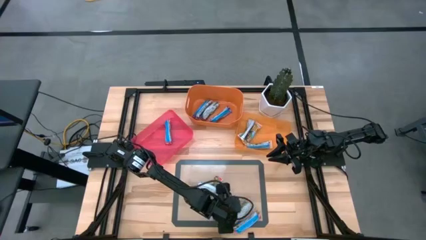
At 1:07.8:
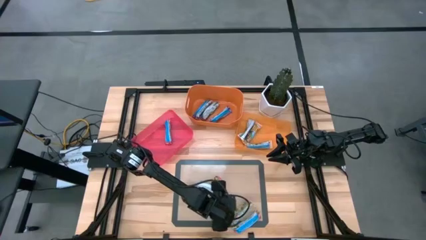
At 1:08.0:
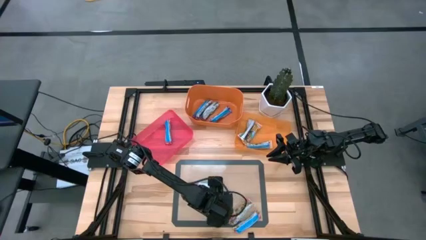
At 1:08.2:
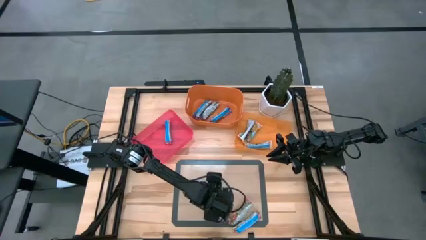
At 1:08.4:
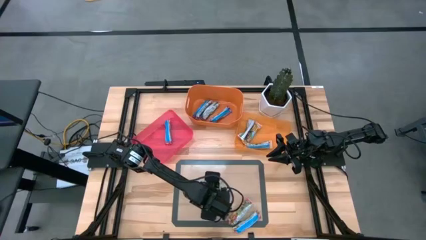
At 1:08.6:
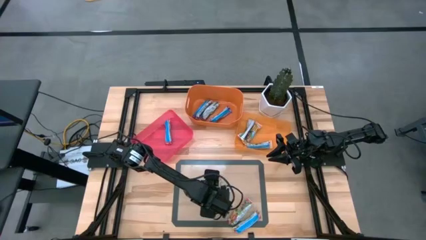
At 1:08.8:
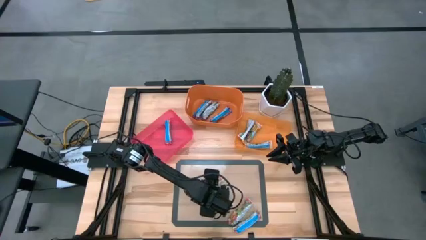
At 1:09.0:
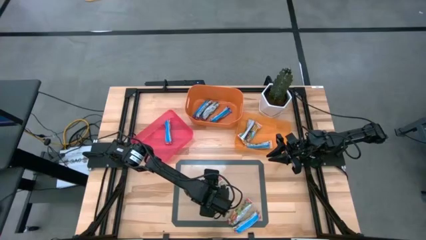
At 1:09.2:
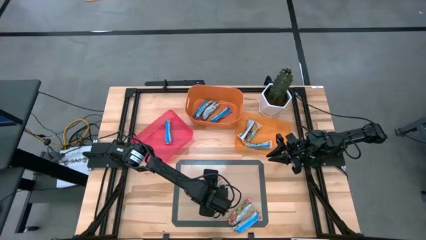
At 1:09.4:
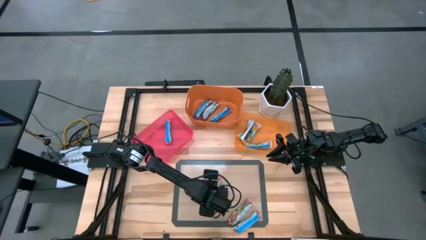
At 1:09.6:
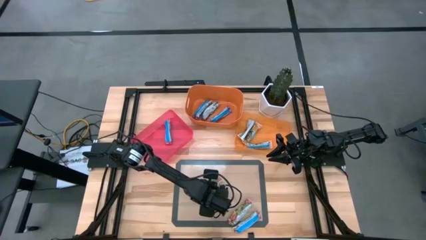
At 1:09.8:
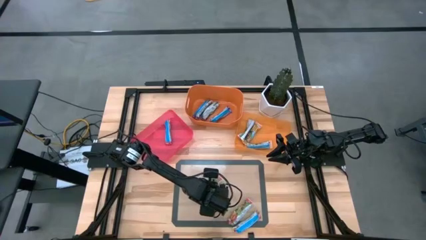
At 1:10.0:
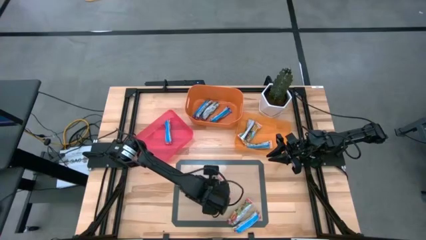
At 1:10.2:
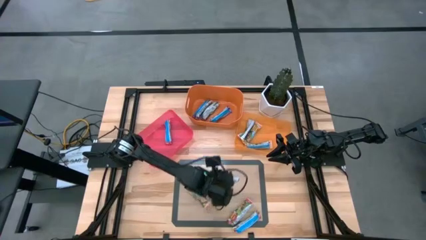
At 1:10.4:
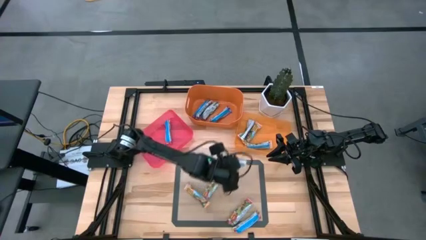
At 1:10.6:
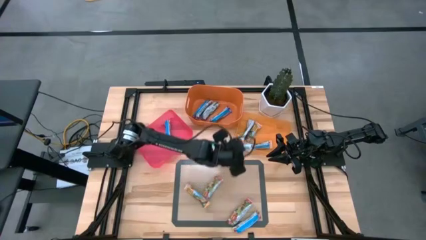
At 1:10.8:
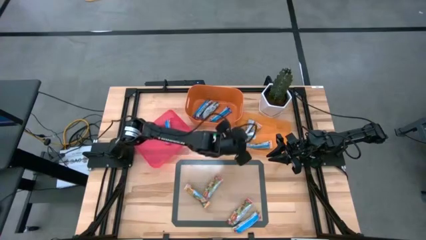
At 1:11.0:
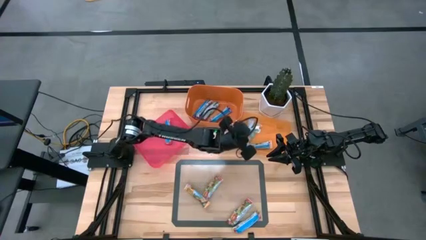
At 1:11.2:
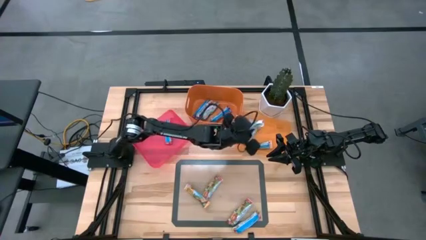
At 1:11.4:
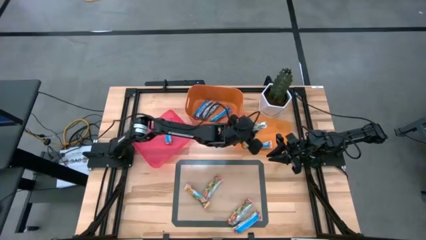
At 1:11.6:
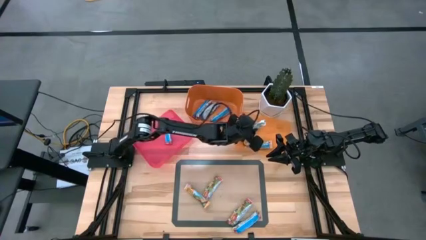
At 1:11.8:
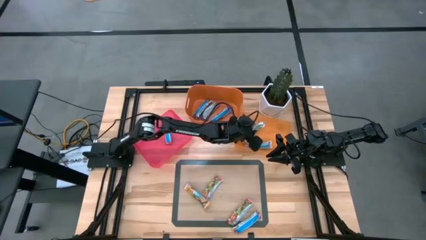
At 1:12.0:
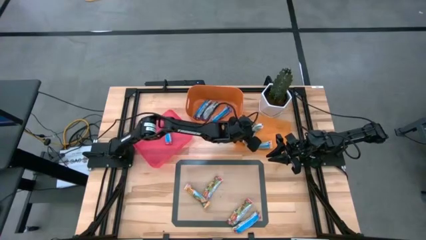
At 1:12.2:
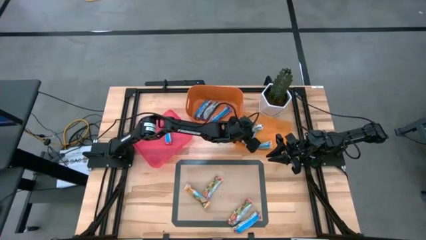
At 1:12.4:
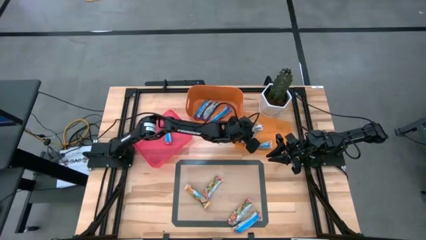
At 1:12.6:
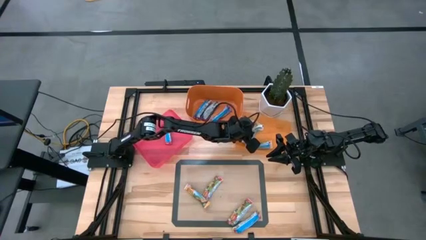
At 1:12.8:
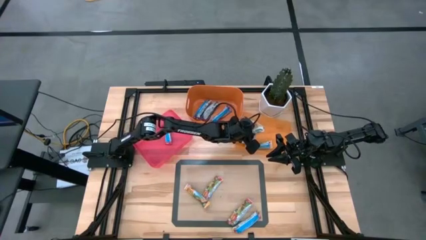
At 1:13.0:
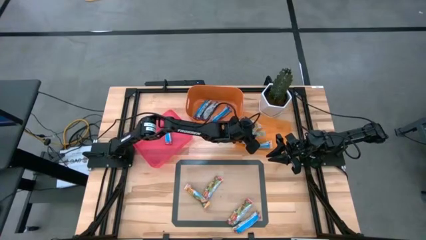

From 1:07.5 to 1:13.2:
Task: Pick and place Granola Bars by type
Put the right yellow granola bar into the light orange bin

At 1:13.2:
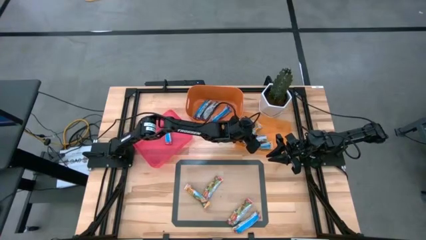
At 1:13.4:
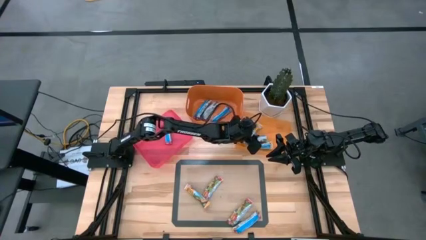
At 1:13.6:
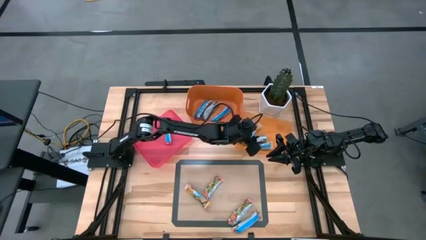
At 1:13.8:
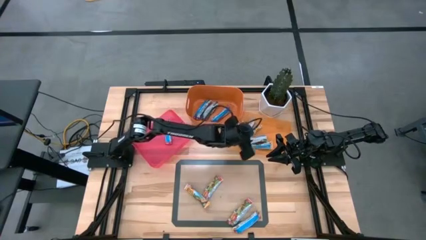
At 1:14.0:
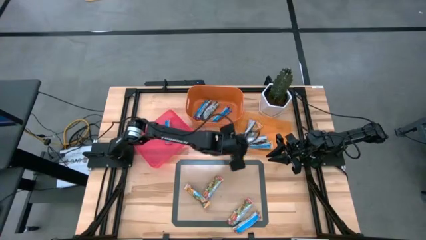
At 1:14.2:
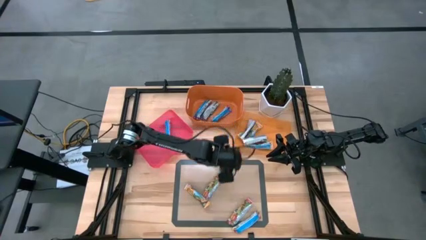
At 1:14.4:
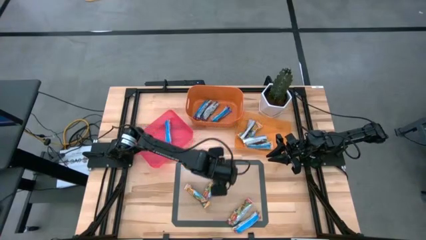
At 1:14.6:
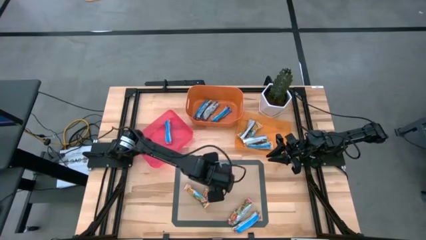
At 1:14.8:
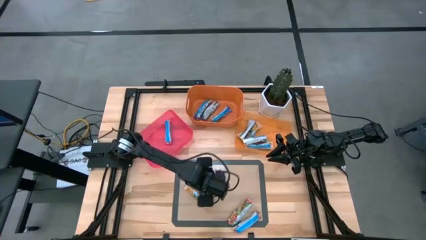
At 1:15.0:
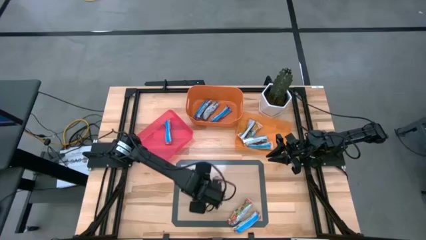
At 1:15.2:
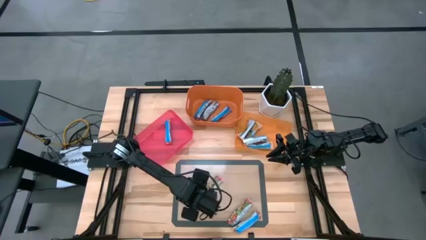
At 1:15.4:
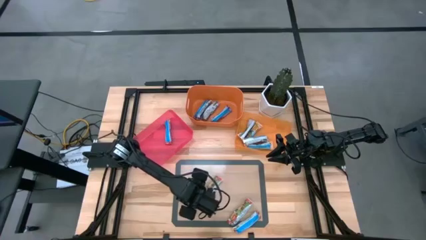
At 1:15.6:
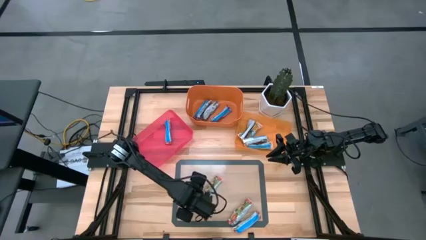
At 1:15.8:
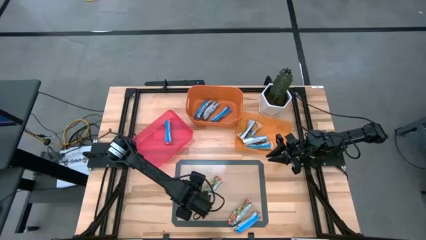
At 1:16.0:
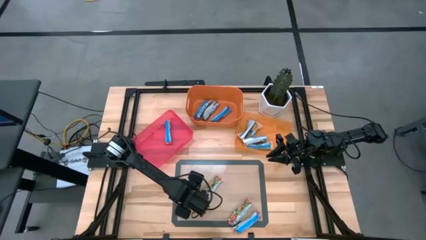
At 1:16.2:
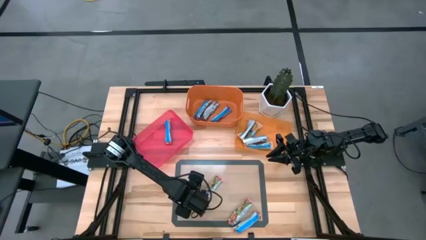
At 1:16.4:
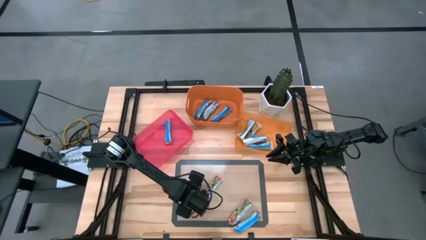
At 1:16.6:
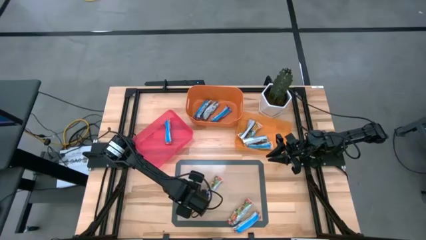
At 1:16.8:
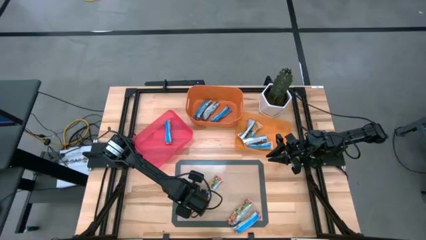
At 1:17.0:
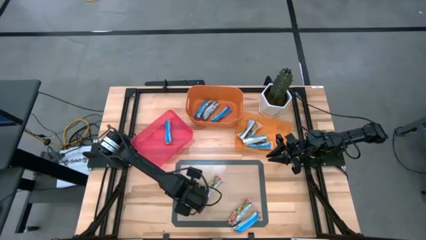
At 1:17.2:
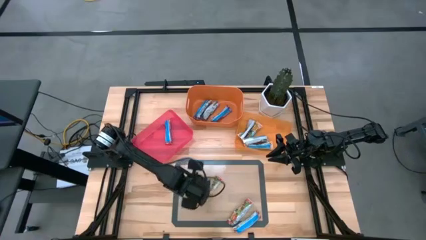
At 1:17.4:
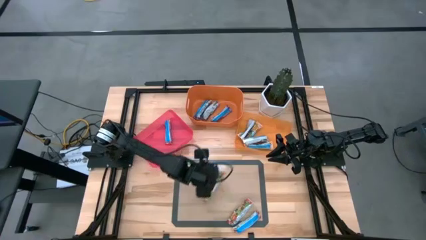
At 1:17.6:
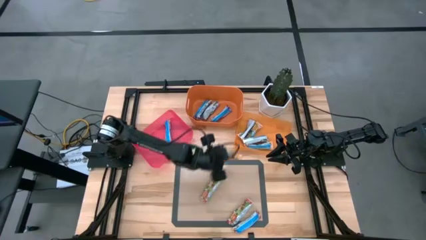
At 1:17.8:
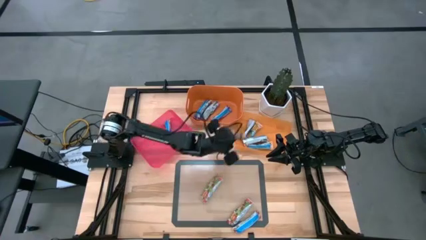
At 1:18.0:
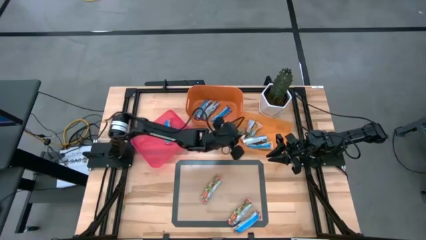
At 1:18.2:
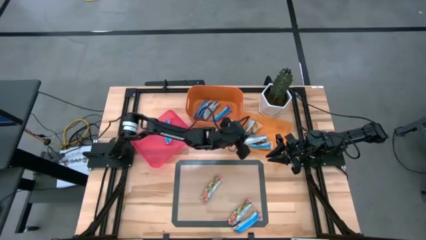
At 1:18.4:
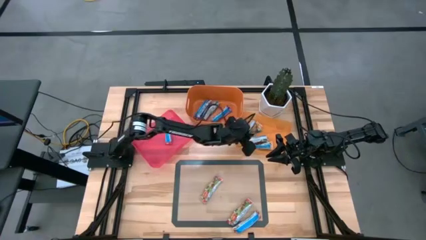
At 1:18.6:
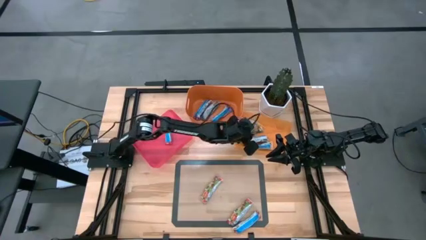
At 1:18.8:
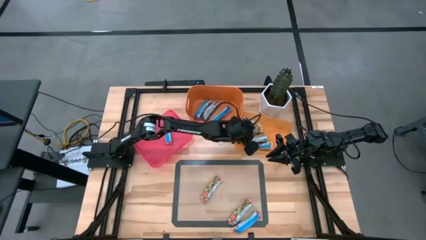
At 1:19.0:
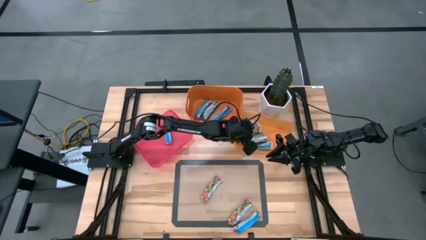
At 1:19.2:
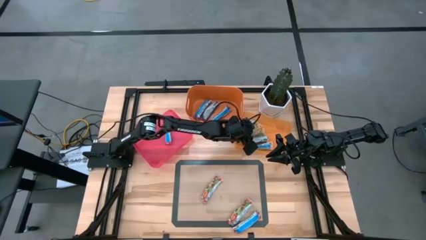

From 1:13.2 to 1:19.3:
Put the yellow granola bar into the light orange bin

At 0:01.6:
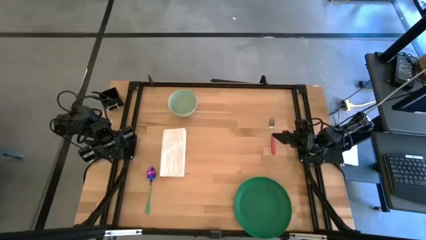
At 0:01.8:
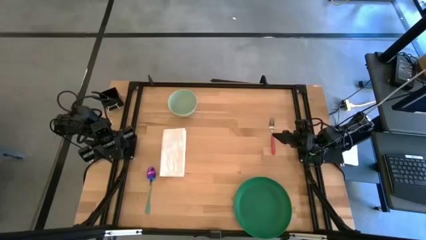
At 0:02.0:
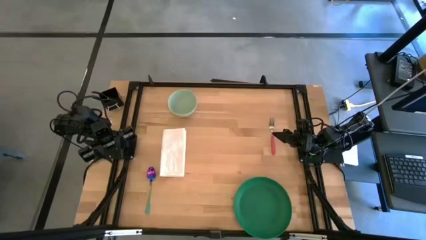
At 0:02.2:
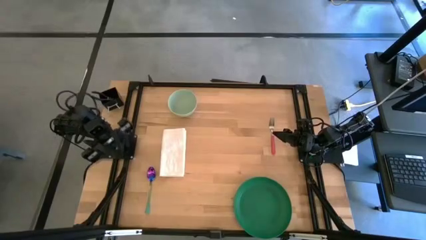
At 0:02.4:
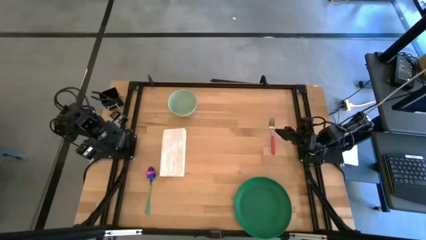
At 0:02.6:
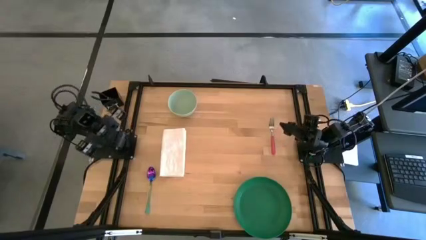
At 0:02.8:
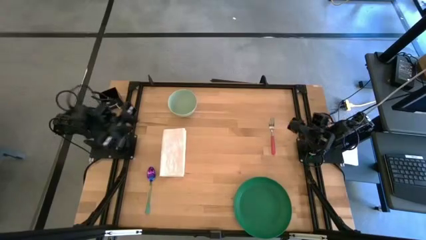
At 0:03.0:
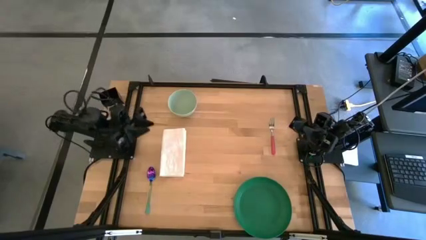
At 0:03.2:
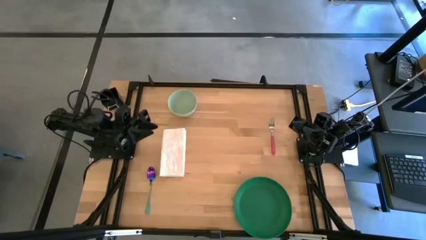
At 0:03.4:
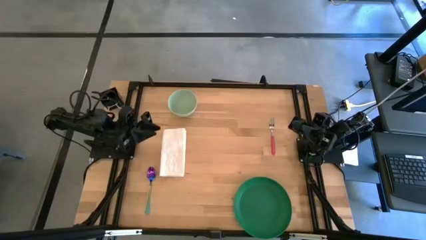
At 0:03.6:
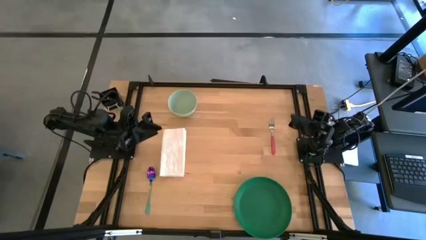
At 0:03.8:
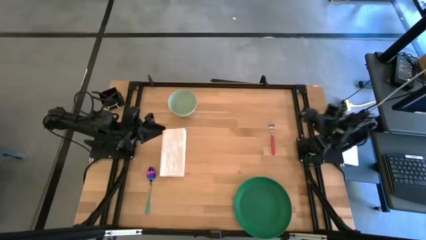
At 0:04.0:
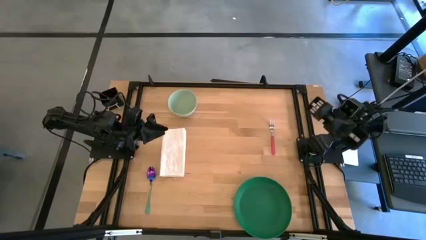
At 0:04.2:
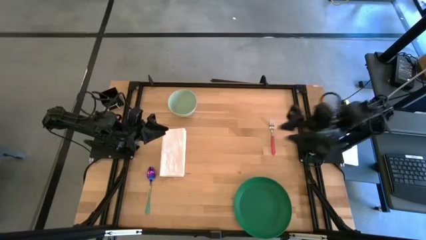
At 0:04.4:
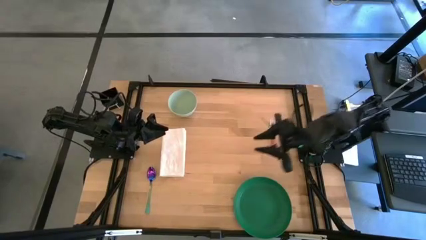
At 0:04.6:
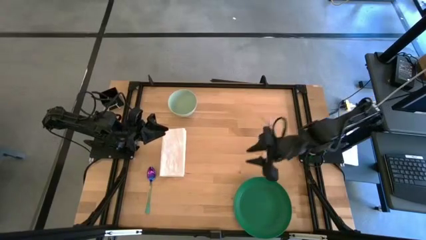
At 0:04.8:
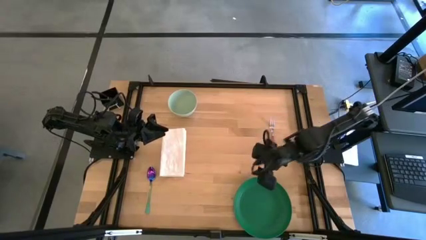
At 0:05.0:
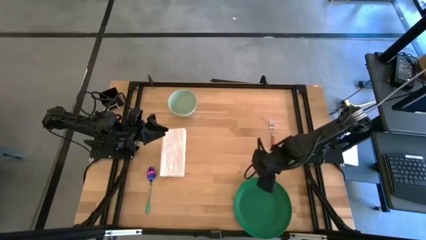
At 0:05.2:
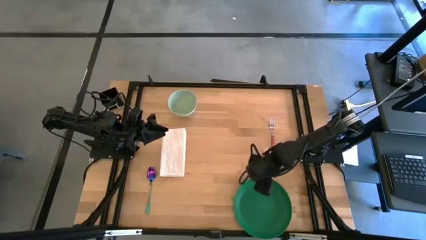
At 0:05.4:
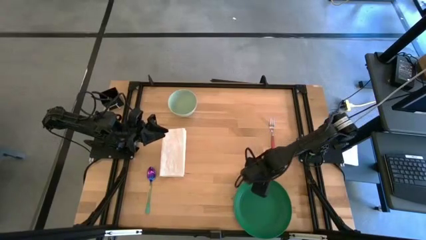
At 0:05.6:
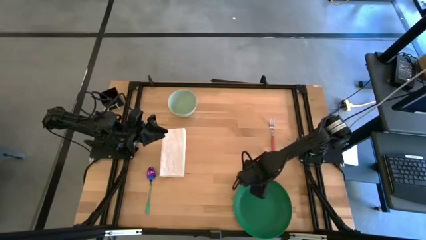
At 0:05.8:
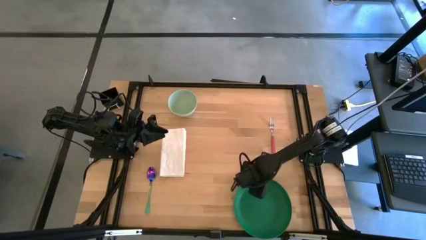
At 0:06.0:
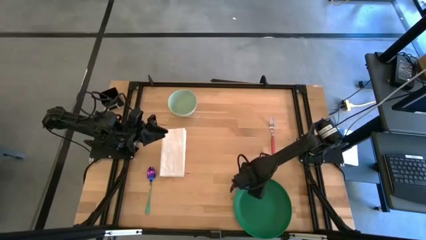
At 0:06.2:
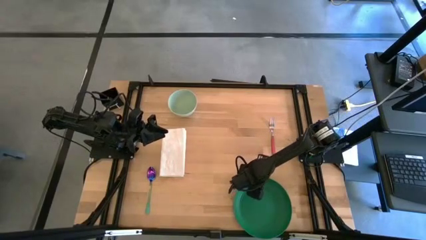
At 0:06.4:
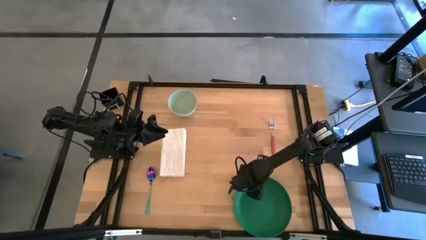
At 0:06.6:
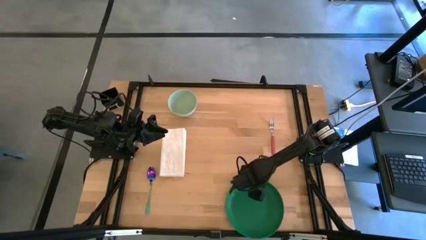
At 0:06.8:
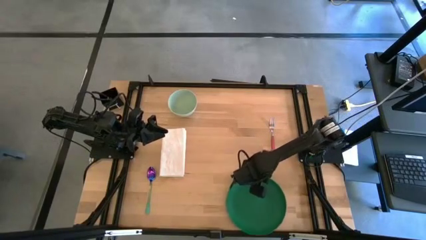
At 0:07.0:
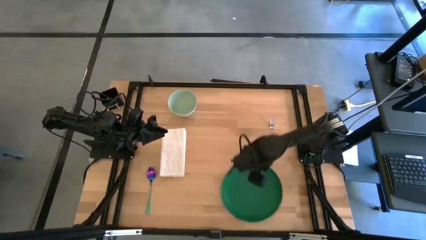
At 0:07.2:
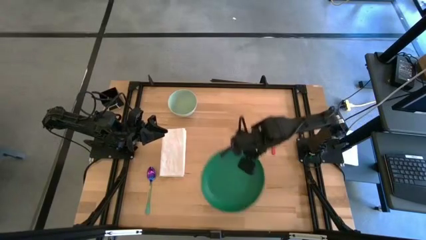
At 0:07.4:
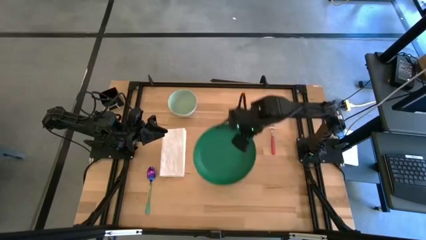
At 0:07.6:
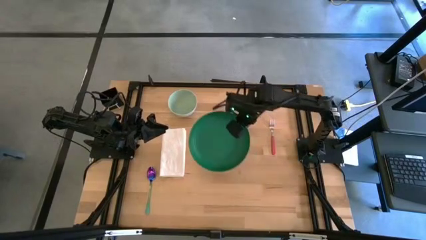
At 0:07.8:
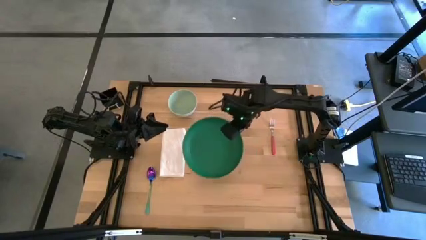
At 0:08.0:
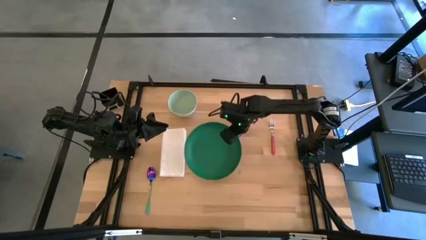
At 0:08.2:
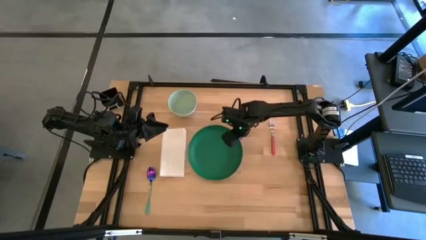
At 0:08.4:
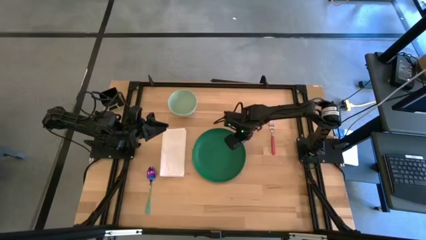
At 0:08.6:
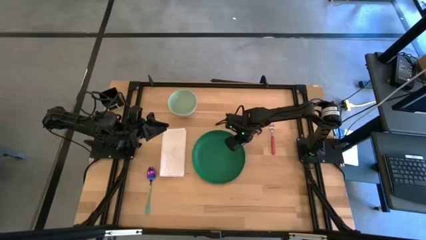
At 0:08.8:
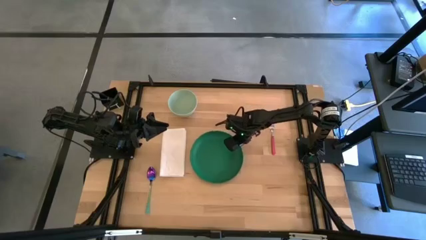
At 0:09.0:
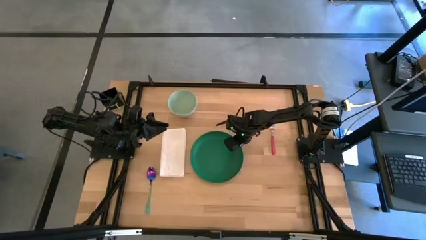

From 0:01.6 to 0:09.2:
Task: Set table place
Move the green plate to the center of the table
